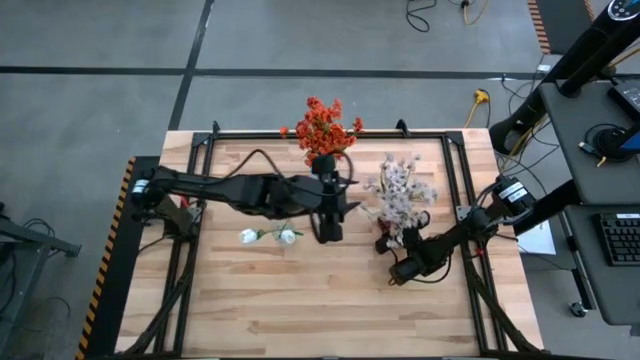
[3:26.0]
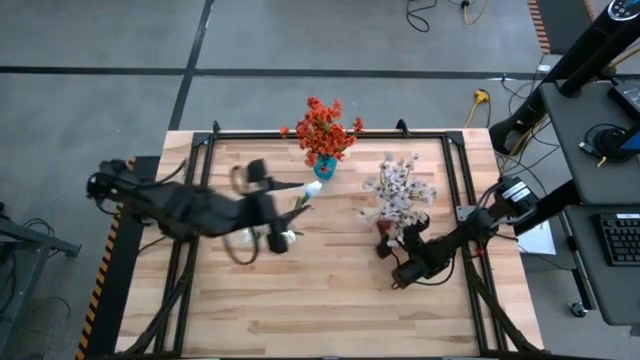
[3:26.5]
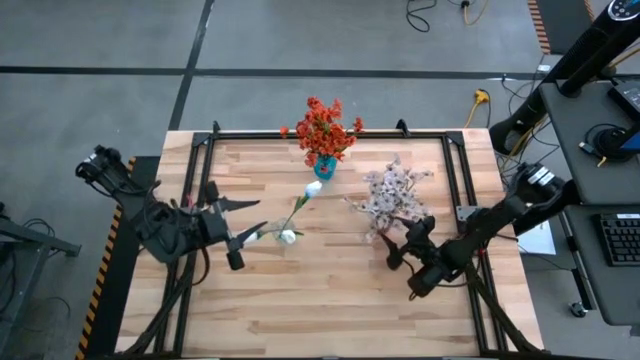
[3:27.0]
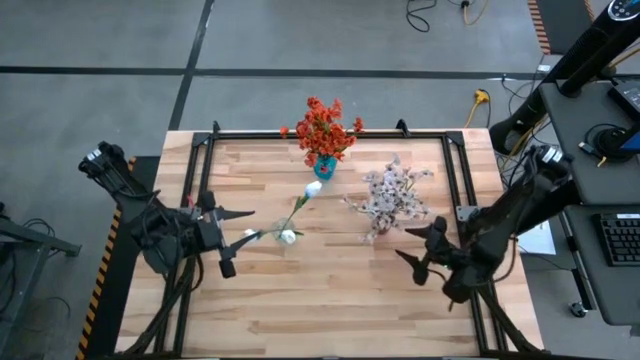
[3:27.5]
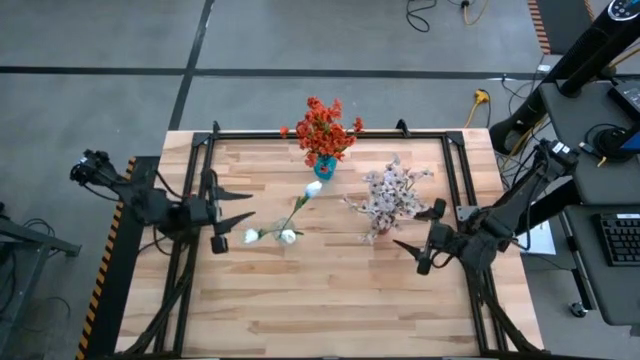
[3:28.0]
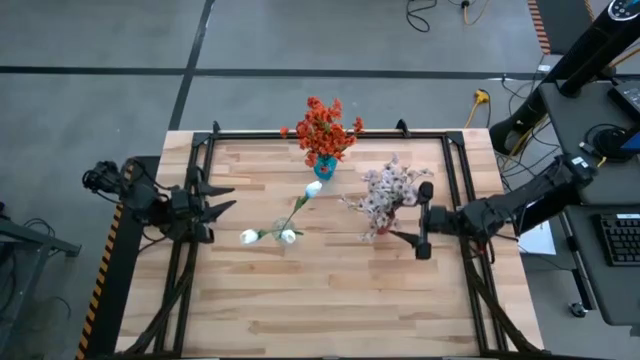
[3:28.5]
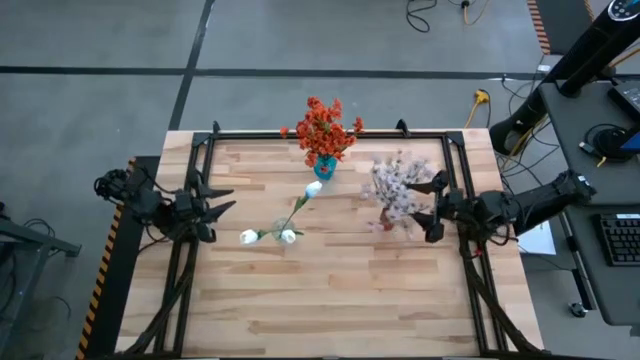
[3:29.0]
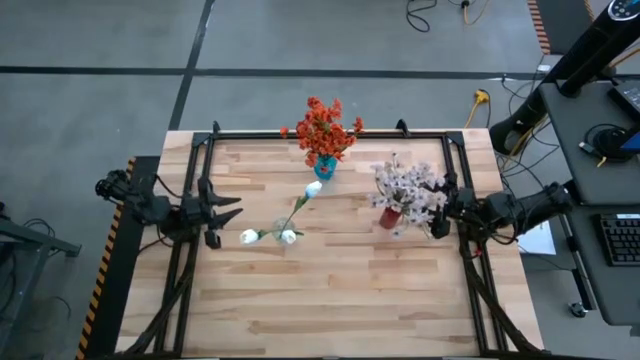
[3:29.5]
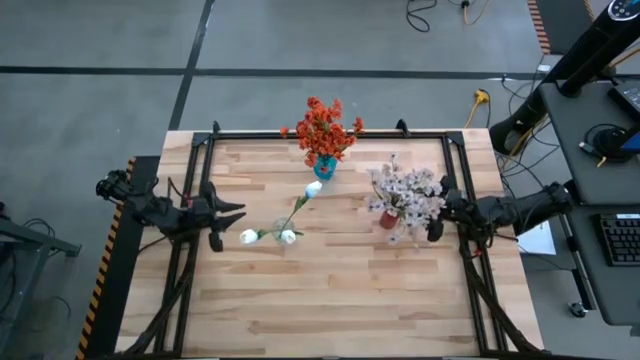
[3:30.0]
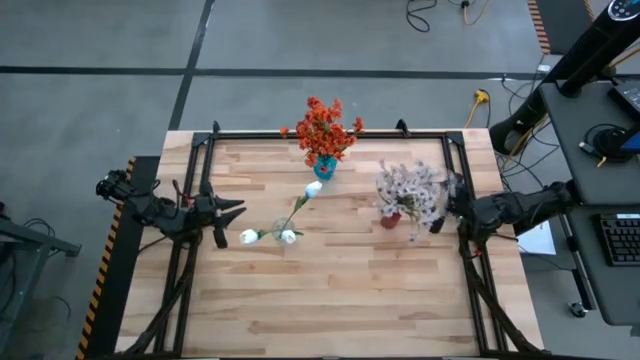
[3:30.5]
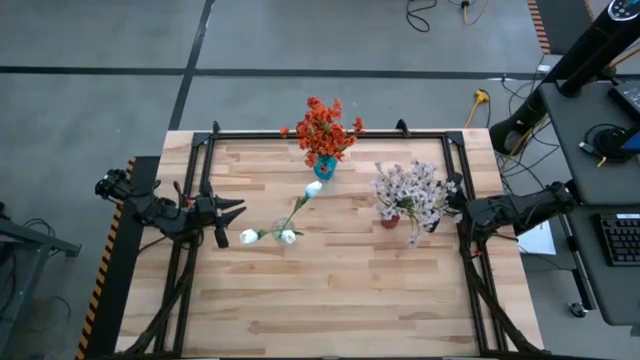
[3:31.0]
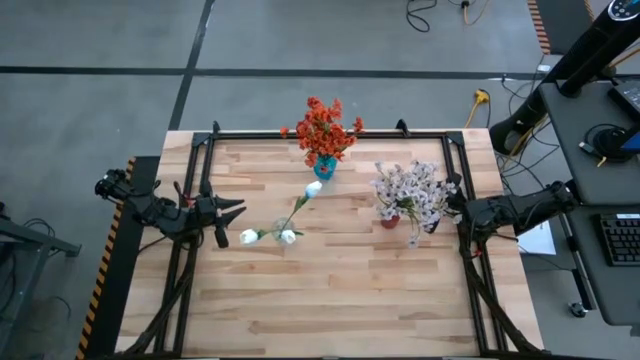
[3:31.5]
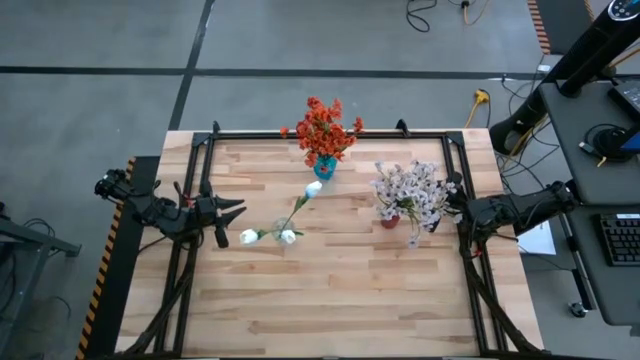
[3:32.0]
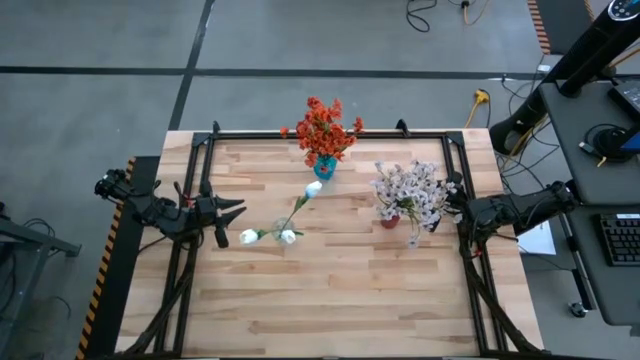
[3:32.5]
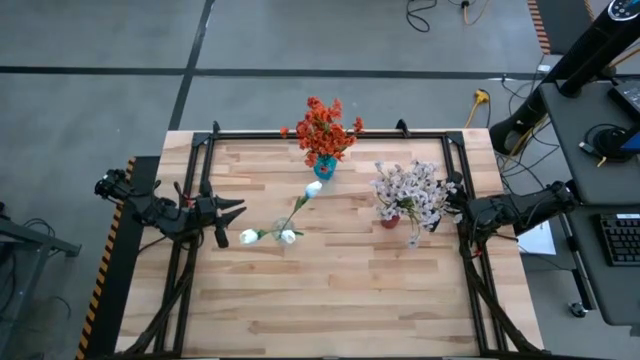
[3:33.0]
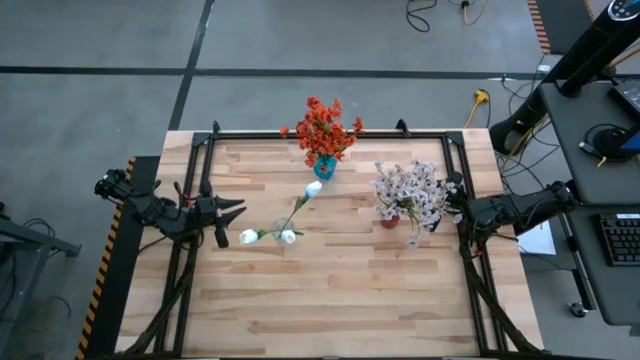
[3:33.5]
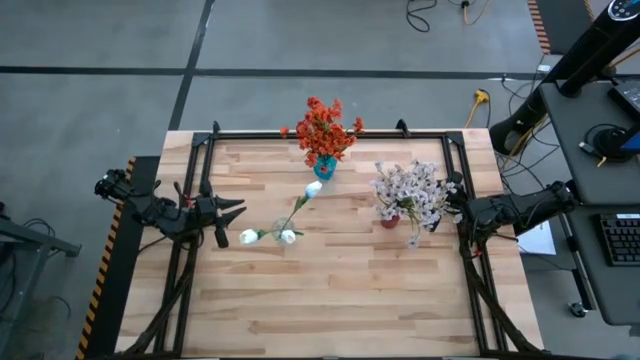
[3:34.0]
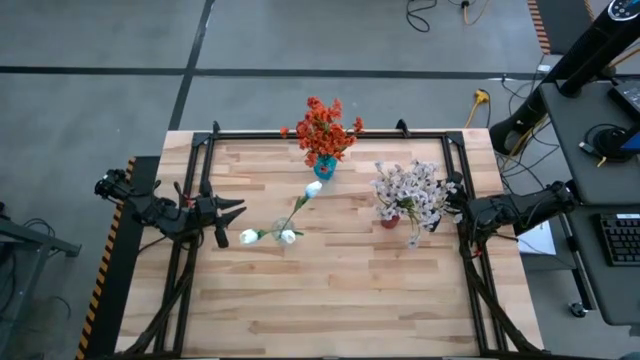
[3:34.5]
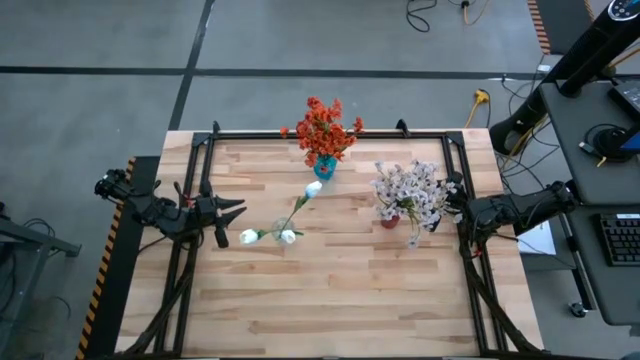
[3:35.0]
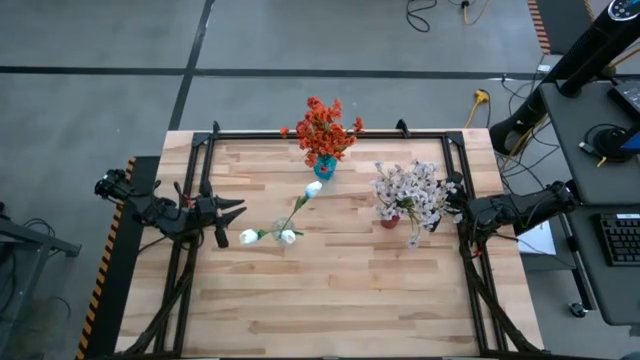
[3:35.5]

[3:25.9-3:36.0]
Task: Sort flowers into vase by color
Return to Home Position

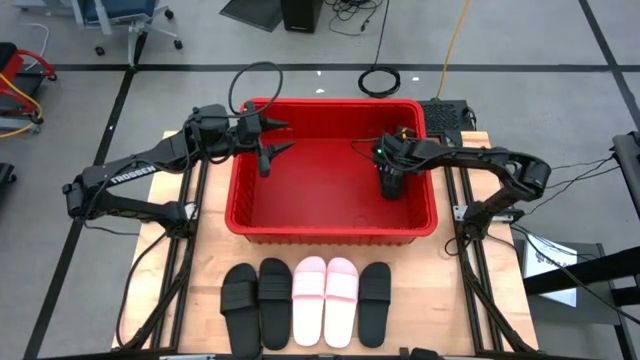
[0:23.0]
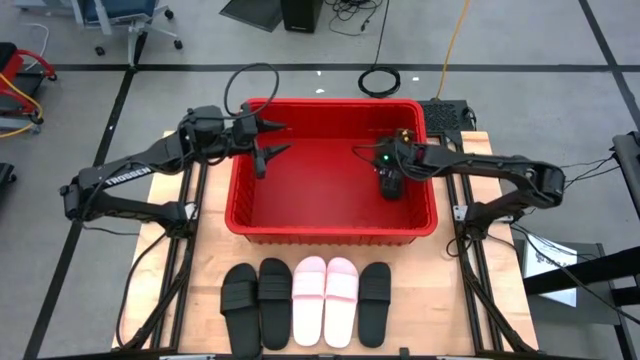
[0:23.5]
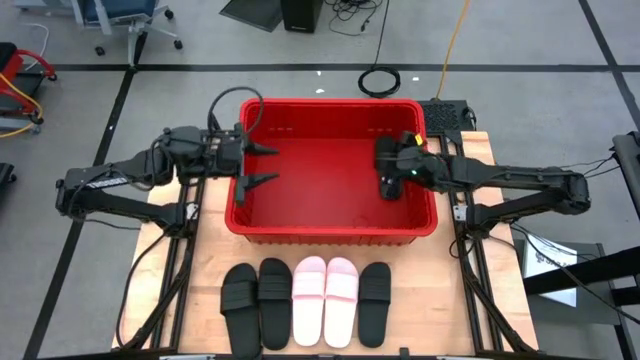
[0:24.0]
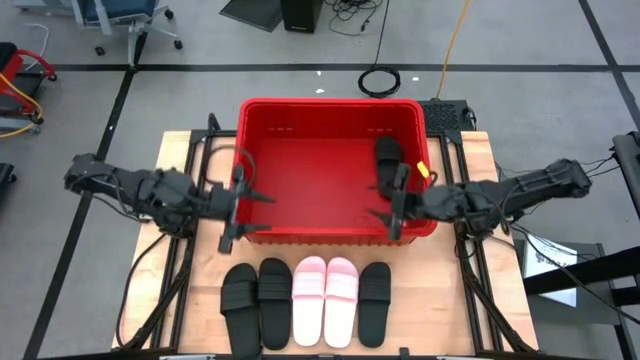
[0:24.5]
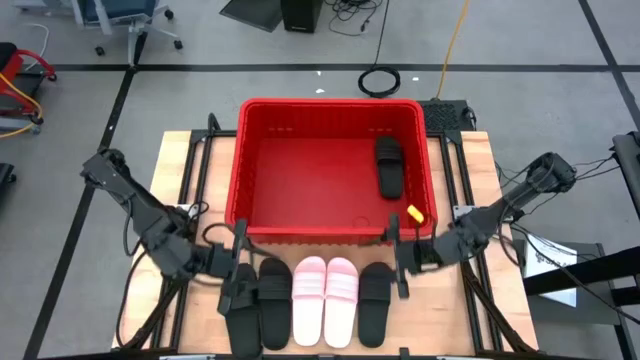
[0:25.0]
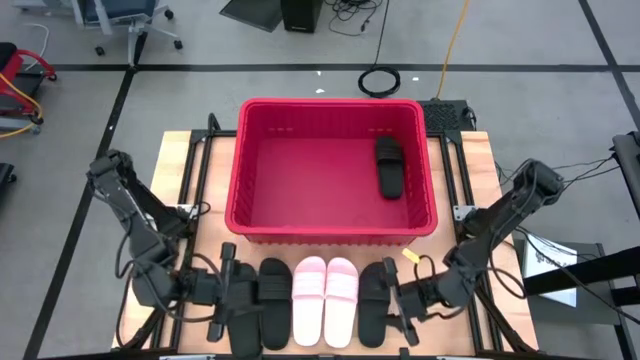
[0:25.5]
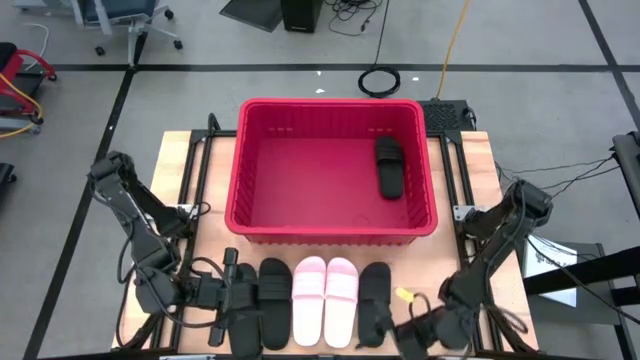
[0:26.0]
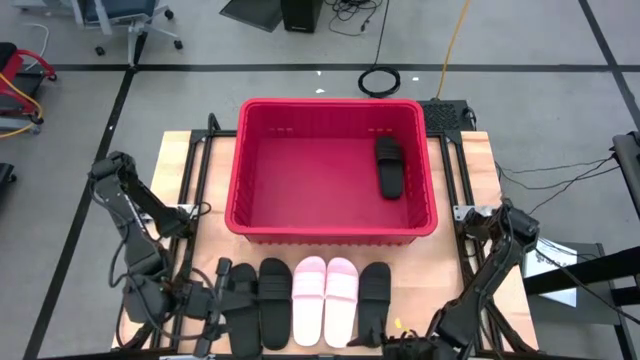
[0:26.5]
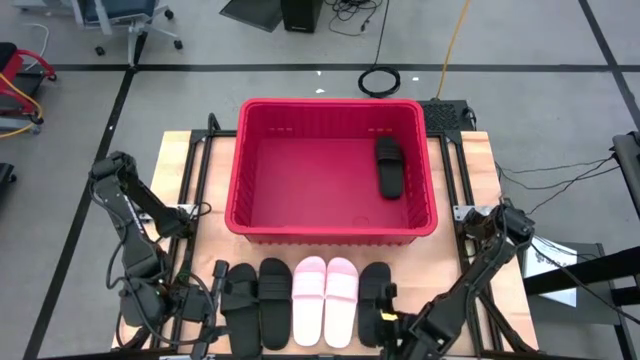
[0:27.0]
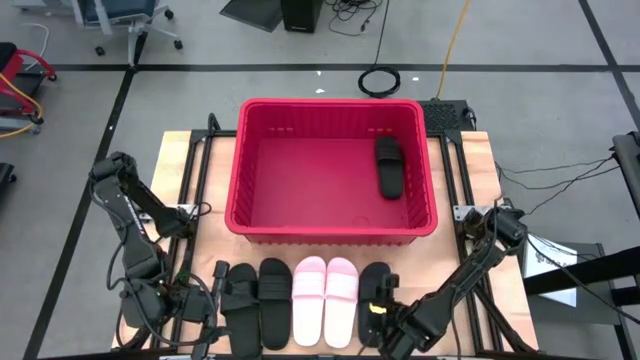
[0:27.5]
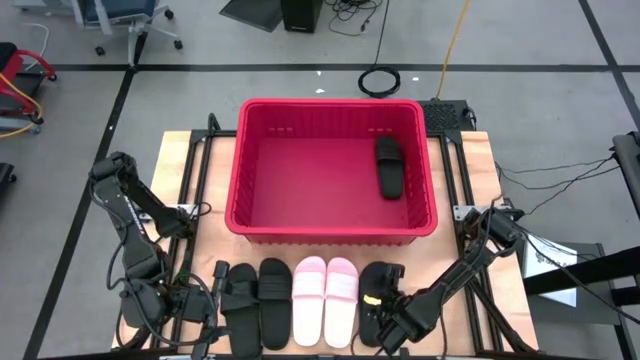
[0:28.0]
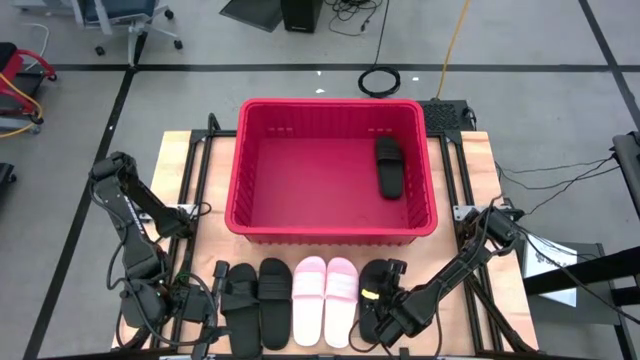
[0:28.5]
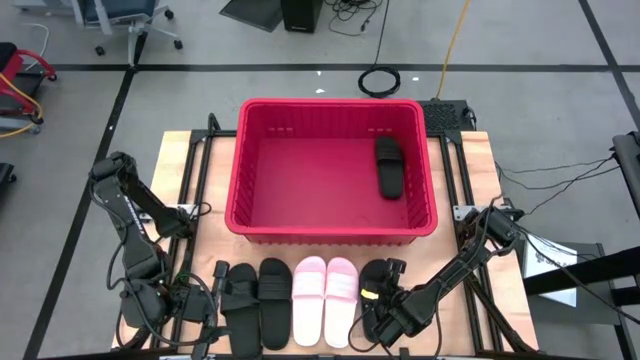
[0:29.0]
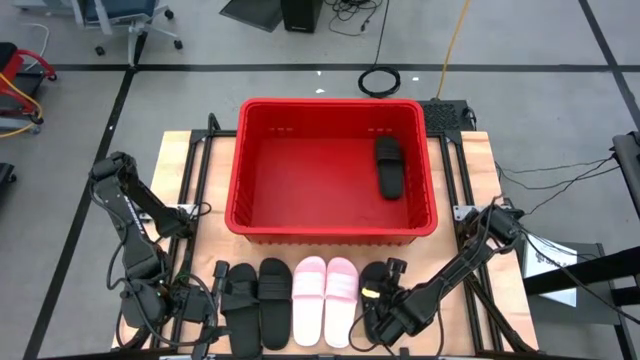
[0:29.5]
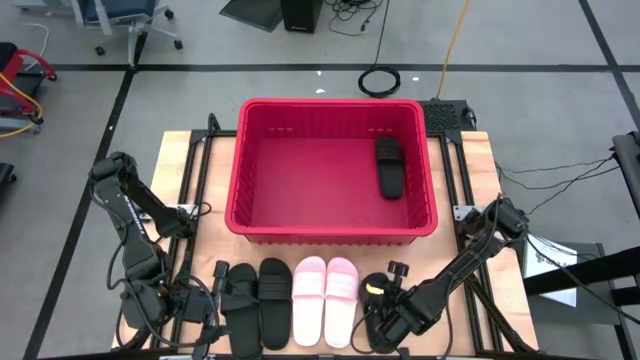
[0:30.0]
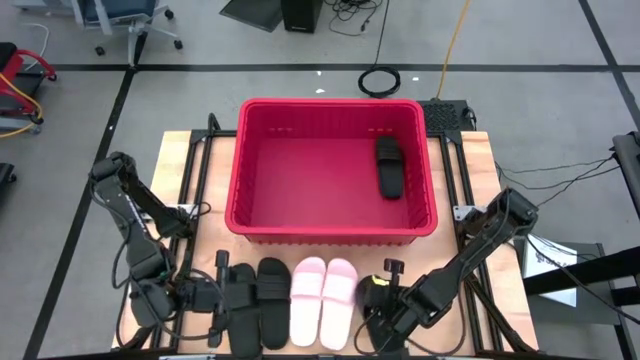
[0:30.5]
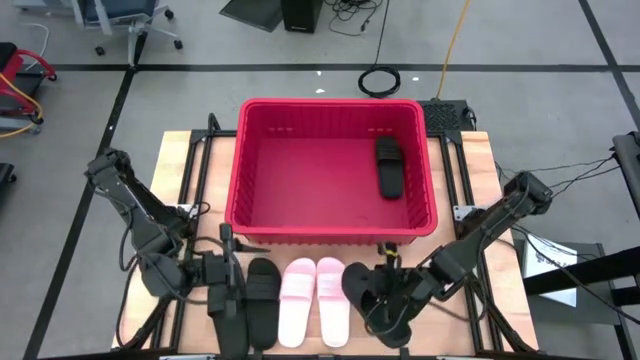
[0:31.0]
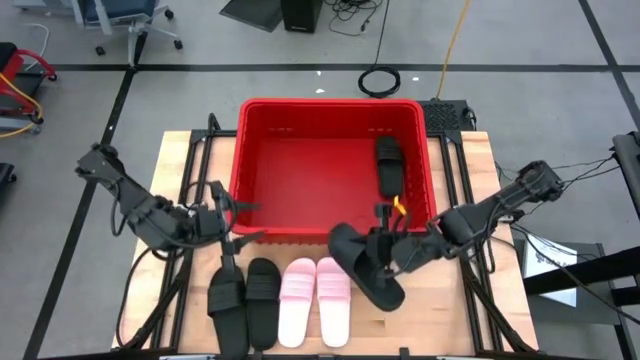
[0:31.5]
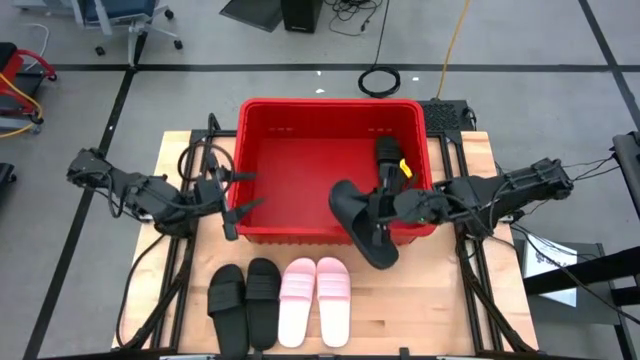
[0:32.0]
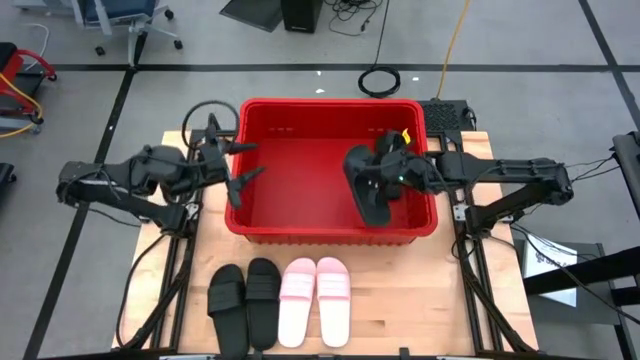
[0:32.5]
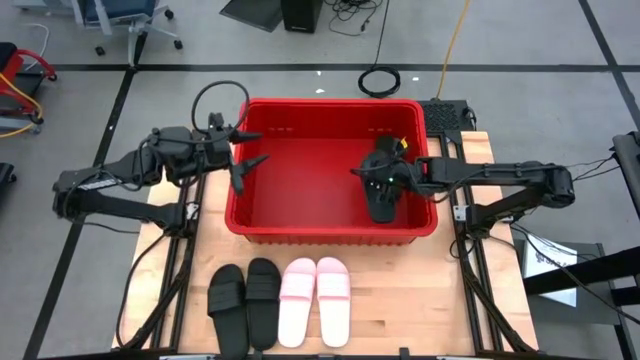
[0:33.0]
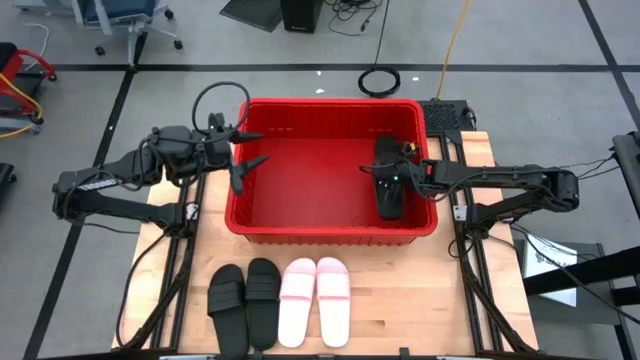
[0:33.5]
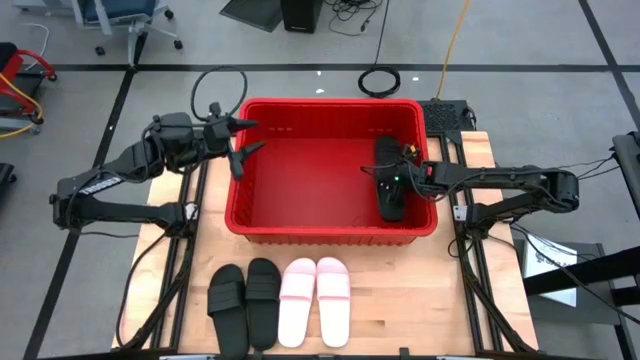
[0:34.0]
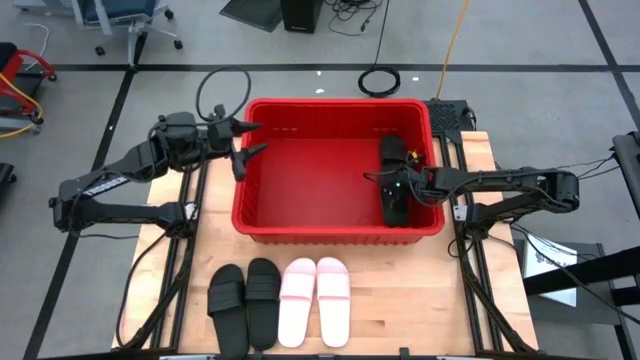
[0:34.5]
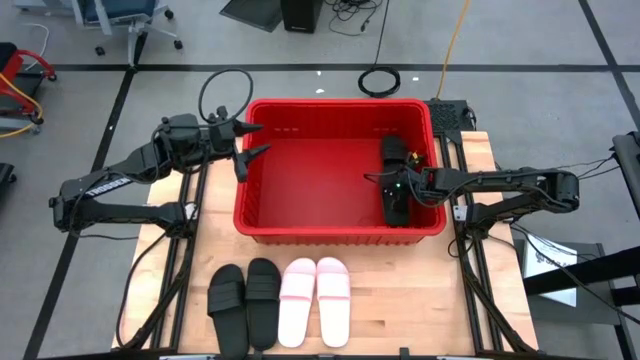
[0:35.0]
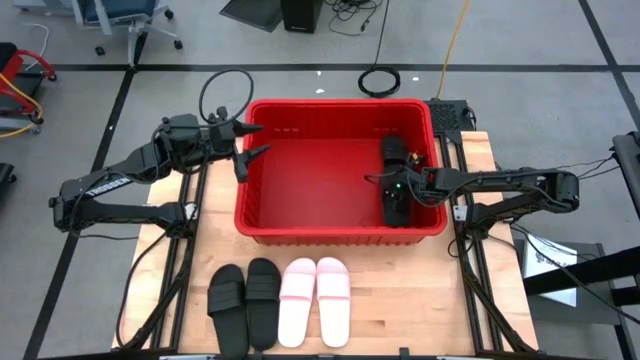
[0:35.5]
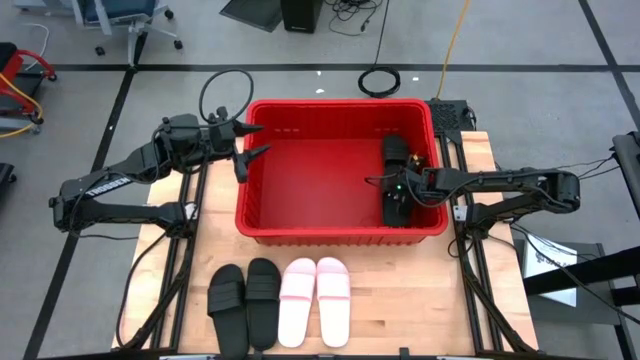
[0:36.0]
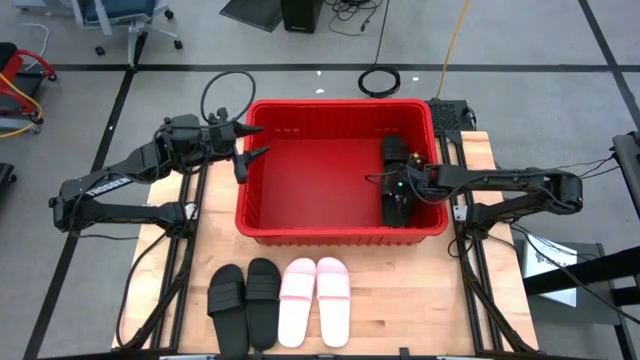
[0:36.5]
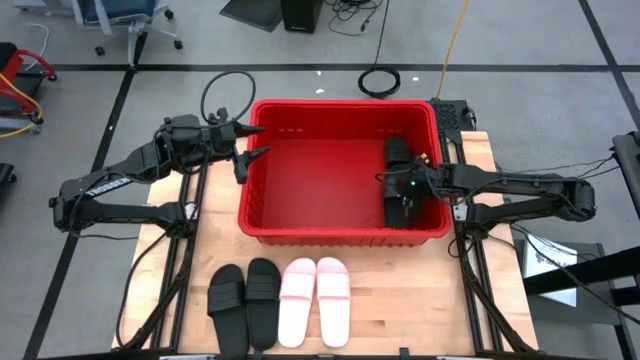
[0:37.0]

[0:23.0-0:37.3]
Task: Pick and place slides into bin
Put the black slide into the red bin
